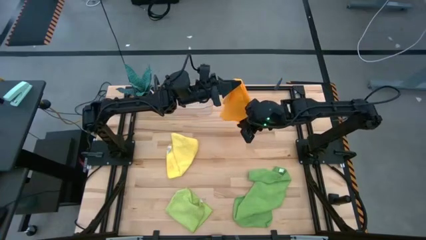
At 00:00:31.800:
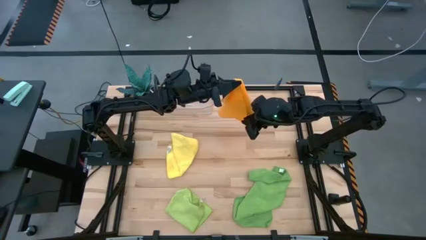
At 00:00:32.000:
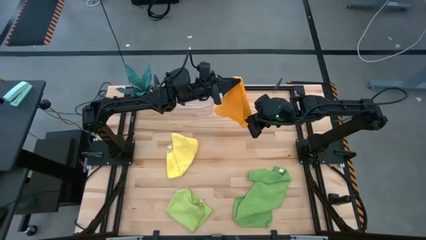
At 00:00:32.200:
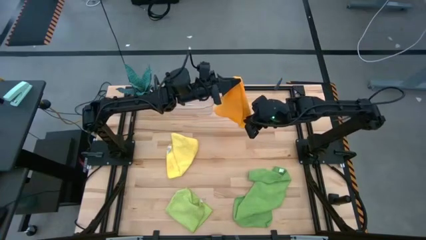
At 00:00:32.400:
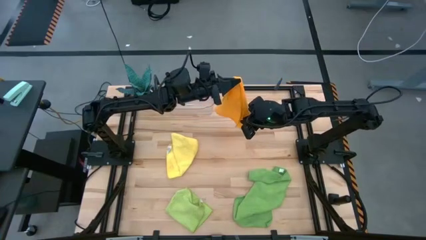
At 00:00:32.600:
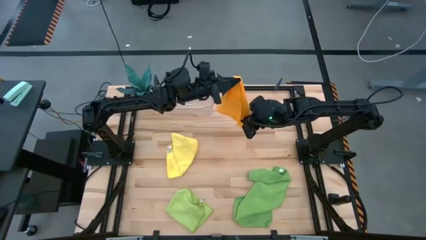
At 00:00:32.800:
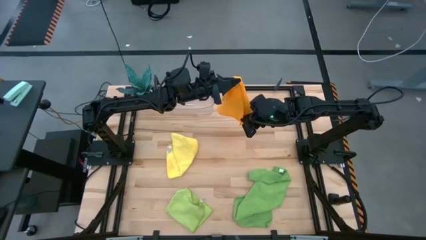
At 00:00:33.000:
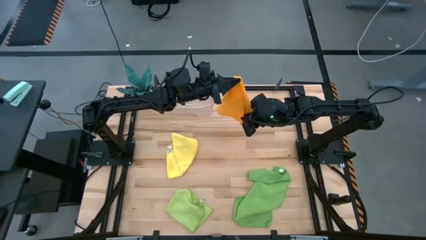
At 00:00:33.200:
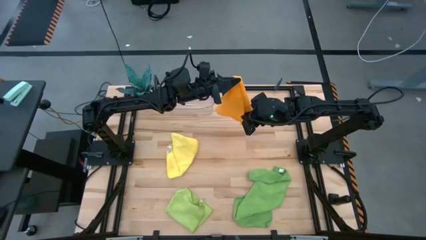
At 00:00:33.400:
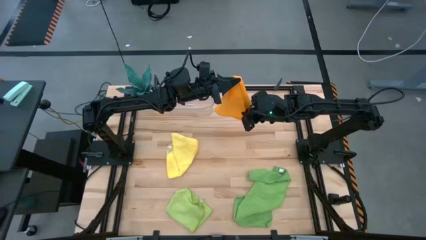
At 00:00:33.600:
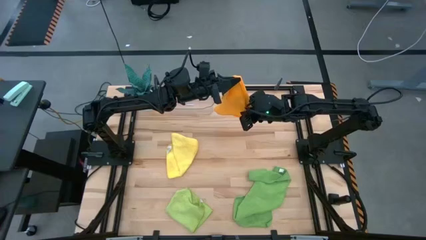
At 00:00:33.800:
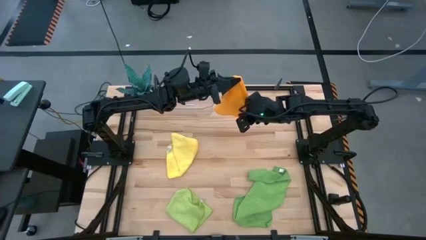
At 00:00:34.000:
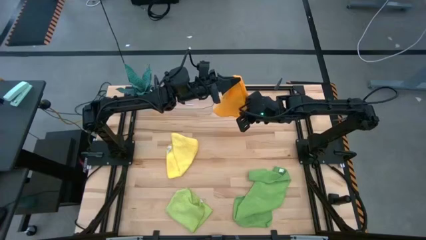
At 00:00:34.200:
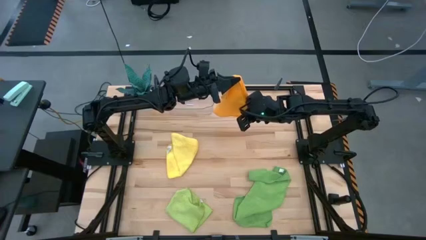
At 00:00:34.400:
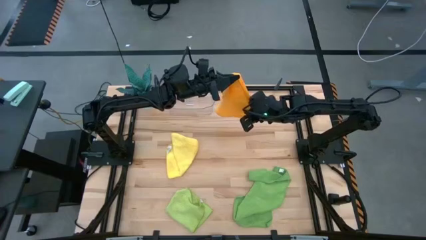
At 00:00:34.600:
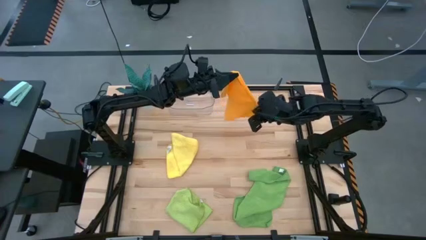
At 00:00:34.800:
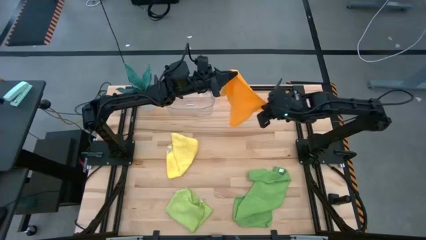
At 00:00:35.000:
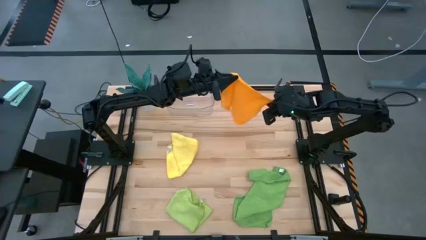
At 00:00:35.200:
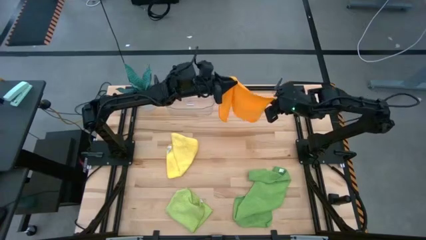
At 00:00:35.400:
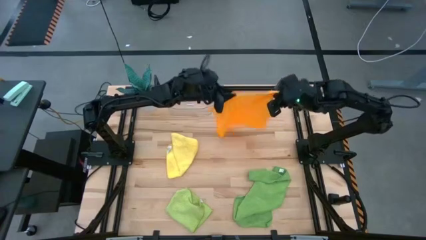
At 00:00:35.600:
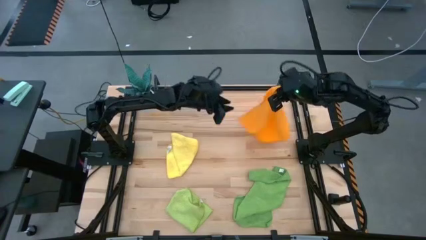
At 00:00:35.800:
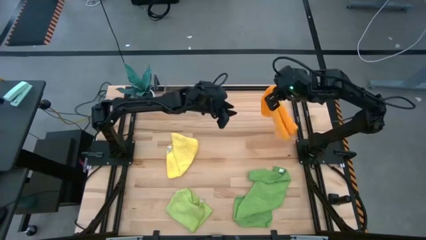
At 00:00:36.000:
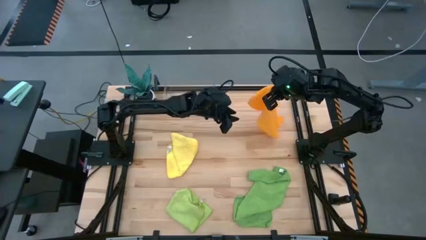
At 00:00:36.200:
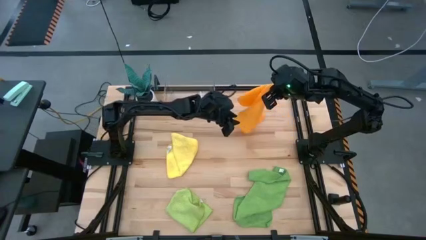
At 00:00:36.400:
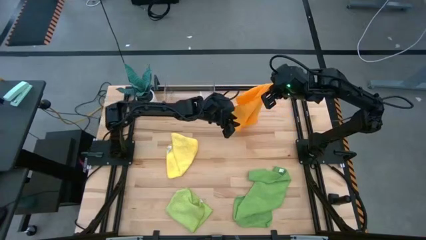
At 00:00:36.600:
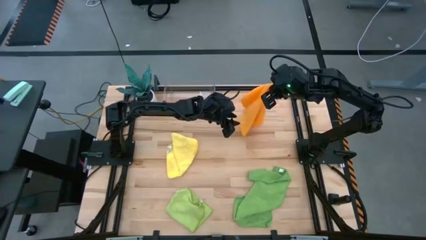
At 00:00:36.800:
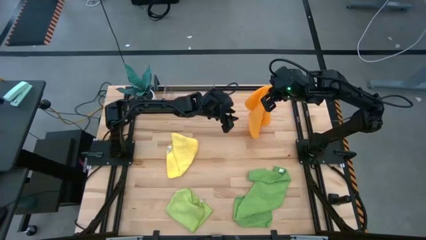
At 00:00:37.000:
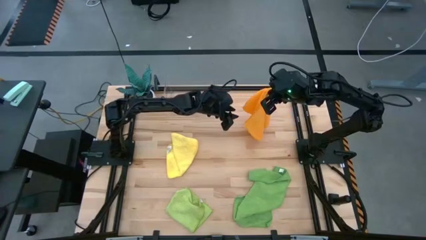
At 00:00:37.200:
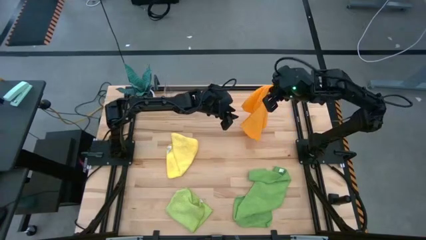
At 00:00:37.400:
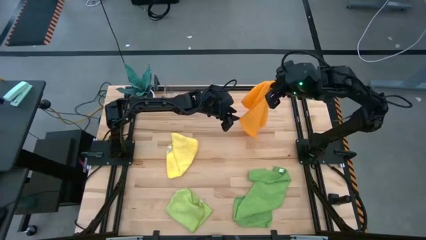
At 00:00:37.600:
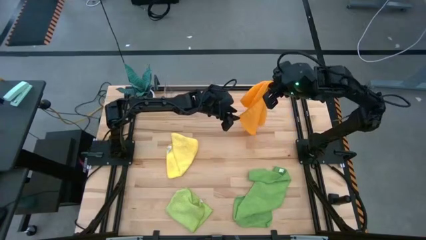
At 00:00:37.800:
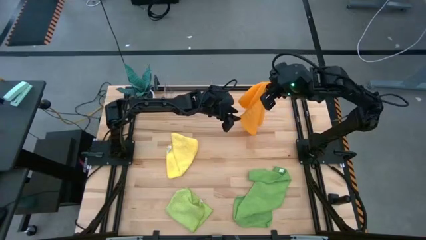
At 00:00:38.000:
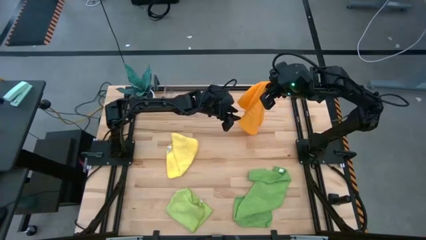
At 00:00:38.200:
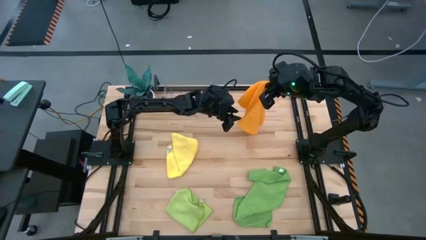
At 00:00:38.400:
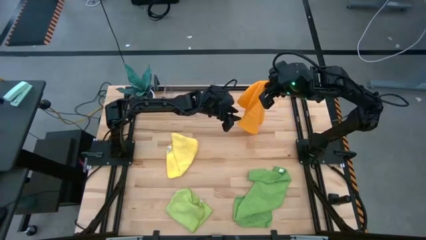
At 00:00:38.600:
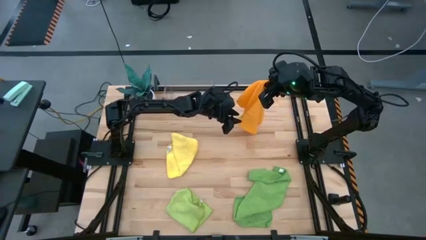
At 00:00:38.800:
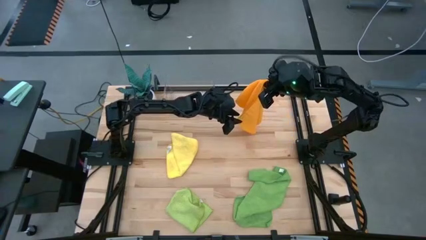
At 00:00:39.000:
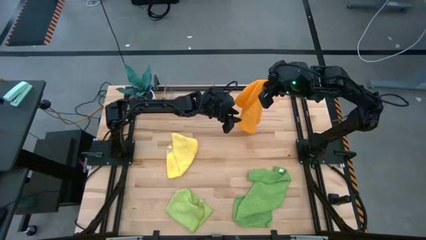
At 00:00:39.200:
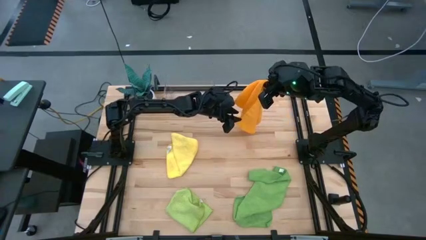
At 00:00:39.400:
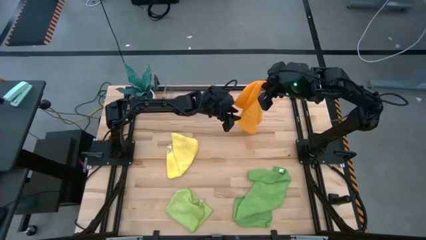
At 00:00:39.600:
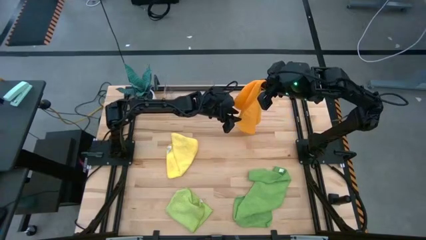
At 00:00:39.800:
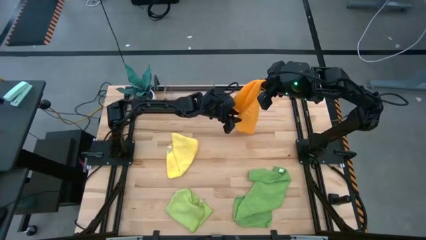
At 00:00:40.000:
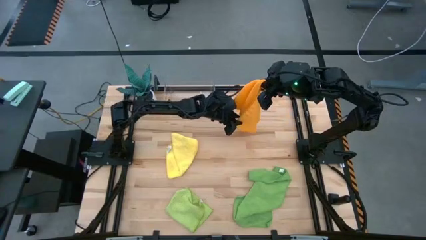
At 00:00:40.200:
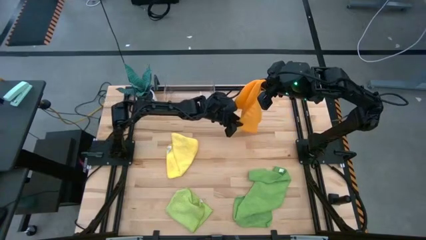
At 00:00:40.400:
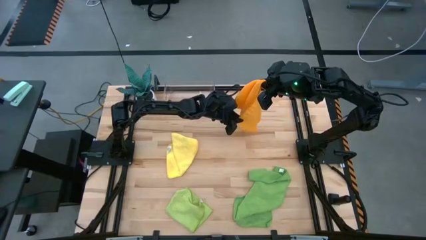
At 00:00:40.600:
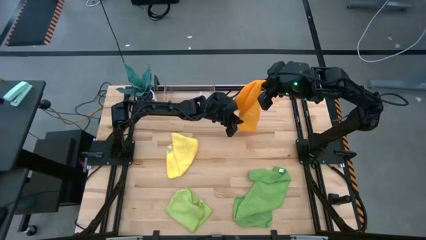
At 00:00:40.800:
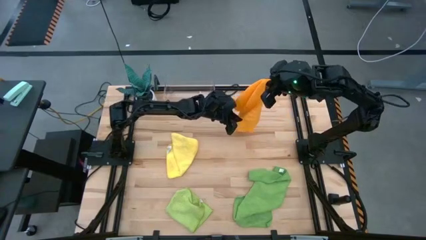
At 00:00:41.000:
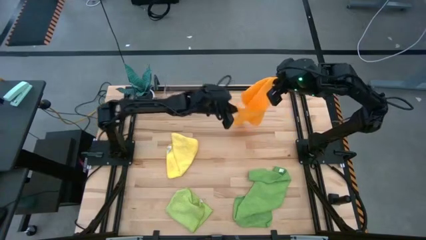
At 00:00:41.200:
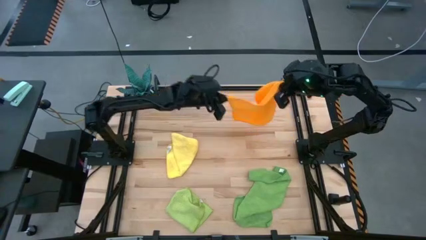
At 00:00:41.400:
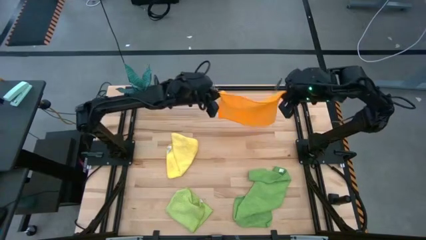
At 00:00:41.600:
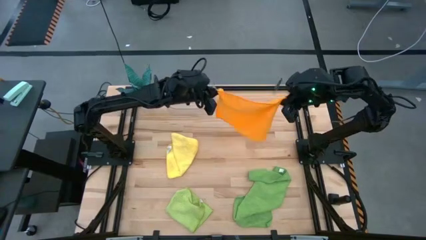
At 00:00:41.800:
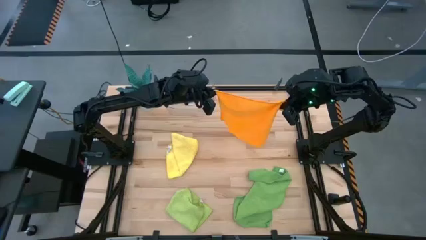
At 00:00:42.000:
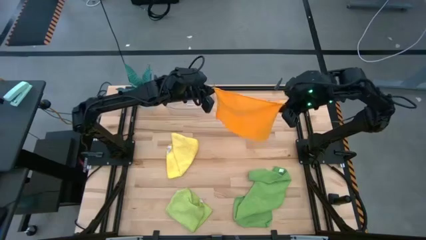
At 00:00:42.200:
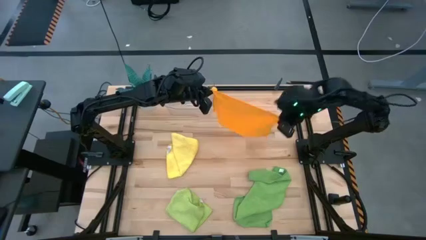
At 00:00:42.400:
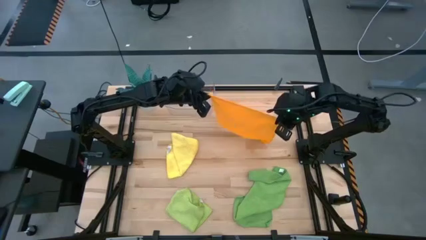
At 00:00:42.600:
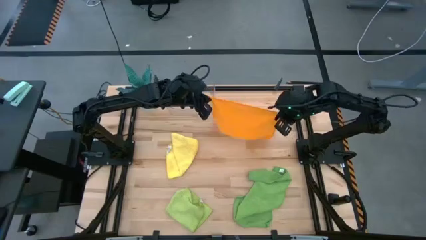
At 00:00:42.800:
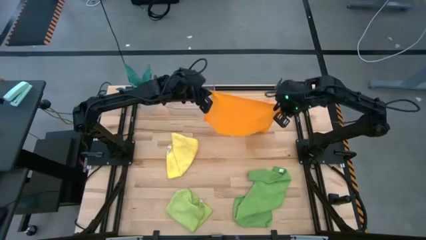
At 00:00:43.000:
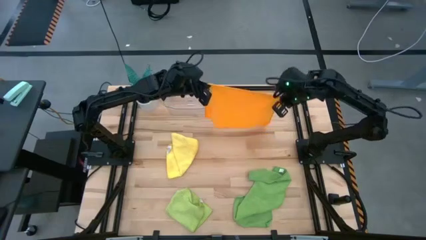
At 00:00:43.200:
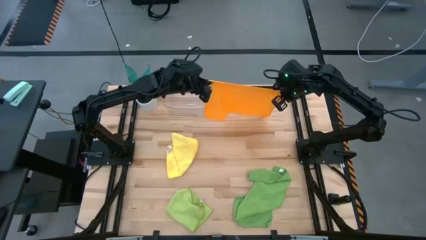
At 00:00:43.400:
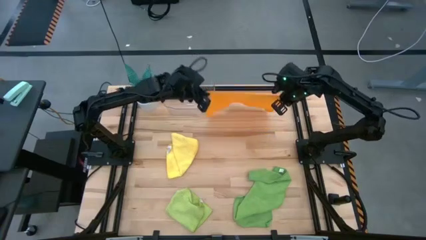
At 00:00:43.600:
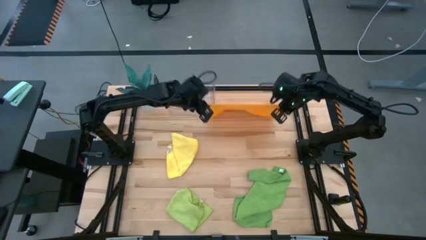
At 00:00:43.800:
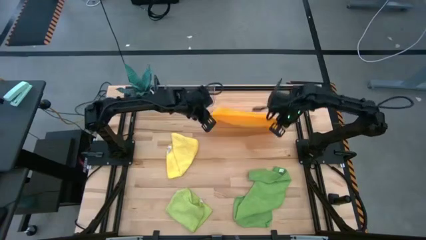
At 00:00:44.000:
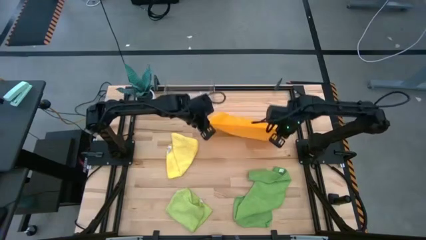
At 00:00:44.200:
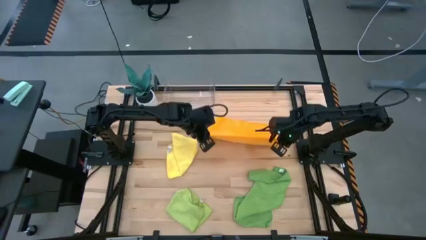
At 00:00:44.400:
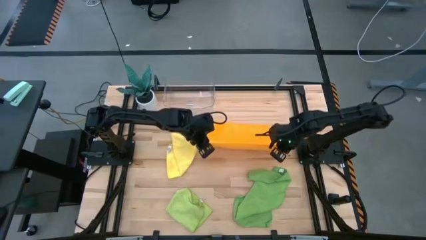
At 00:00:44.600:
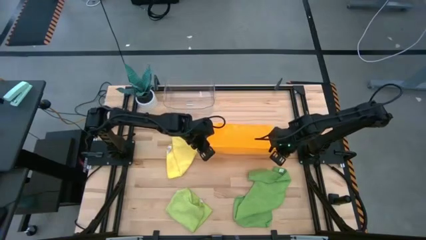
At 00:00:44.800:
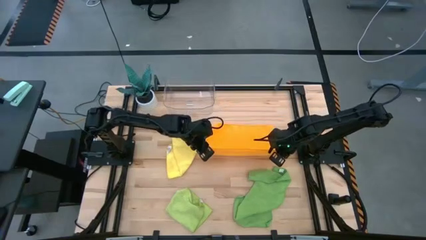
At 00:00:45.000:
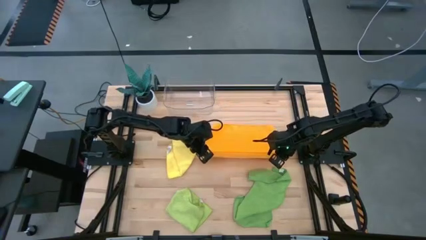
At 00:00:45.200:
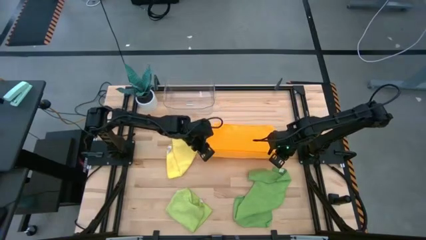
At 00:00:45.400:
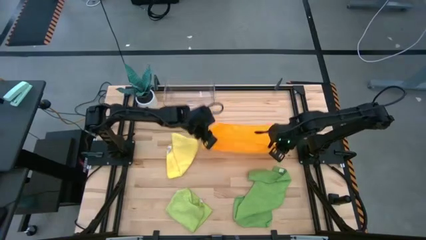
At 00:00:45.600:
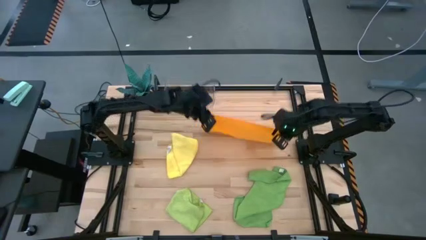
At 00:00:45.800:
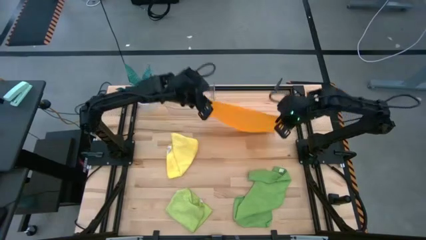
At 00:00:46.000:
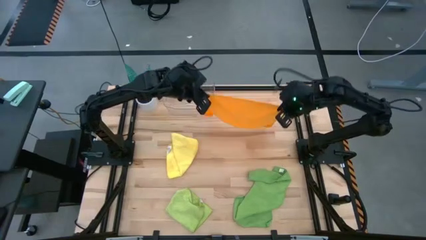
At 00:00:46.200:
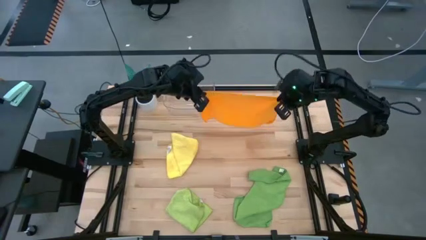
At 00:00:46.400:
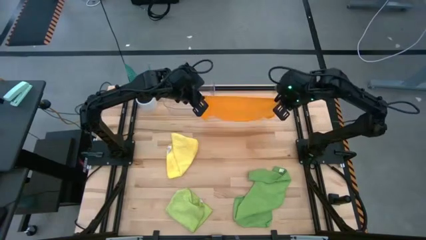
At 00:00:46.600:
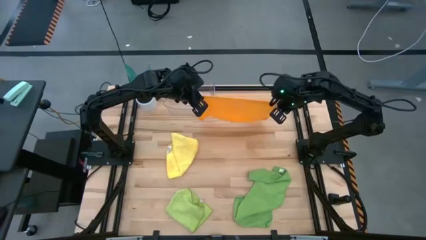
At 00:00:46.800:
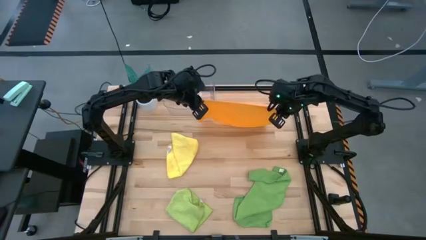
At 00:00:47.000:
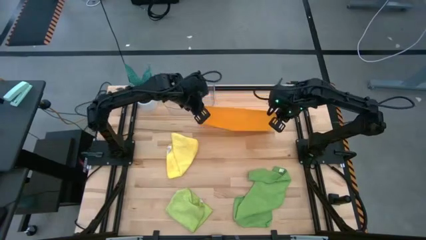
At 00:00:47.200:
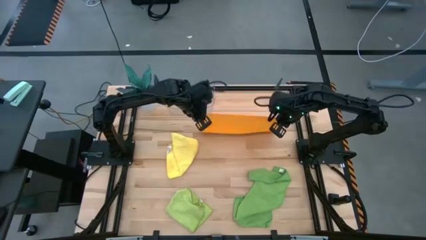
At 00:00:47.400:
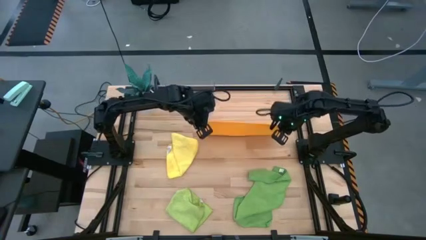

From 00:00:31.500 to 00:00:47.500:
Task: Fold microfiber towels
Fold the orange towel
